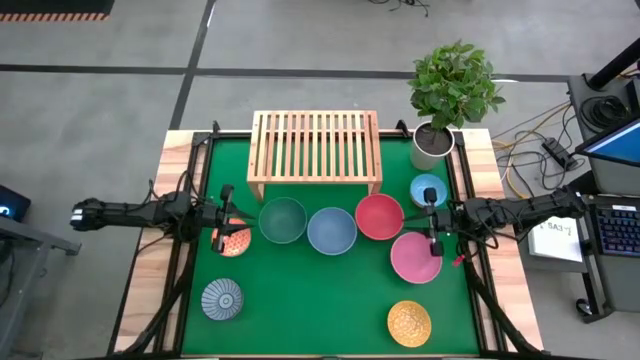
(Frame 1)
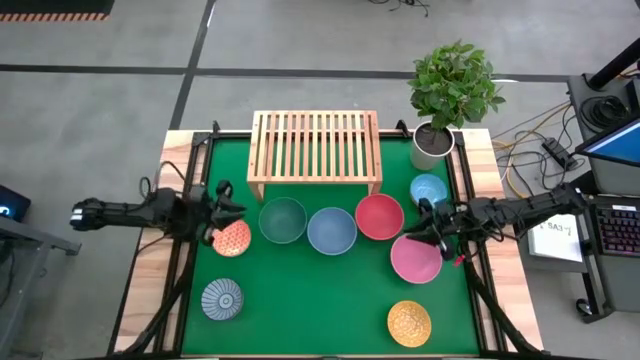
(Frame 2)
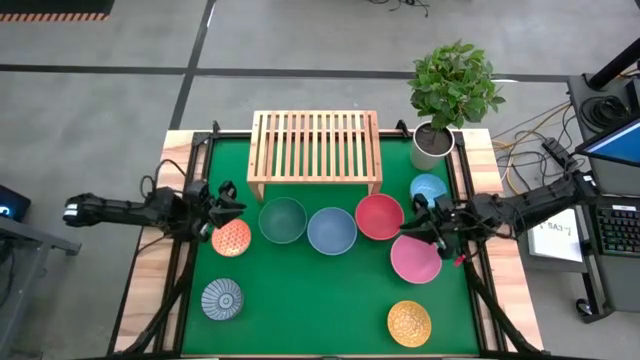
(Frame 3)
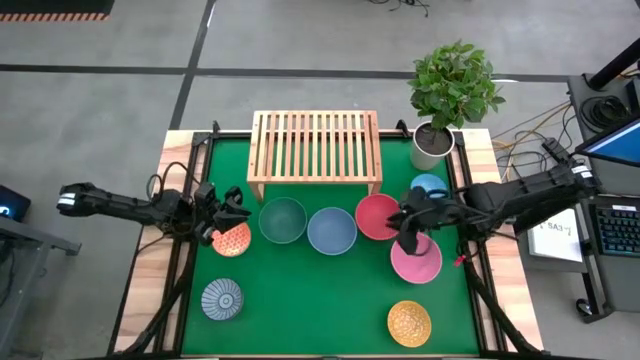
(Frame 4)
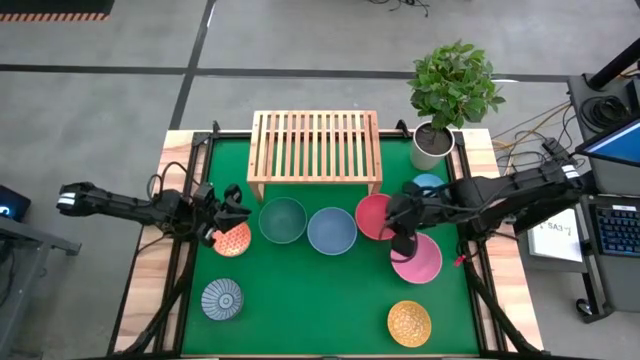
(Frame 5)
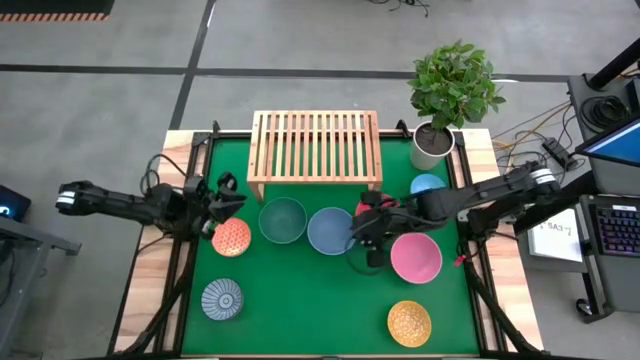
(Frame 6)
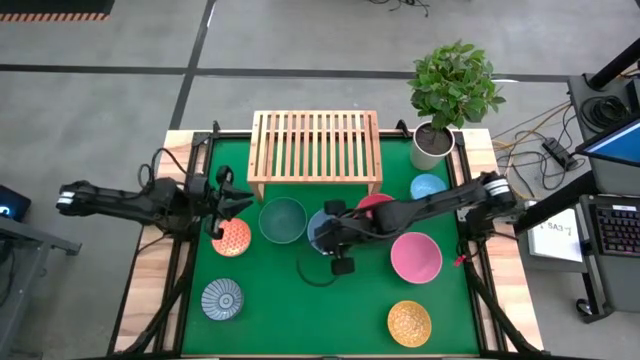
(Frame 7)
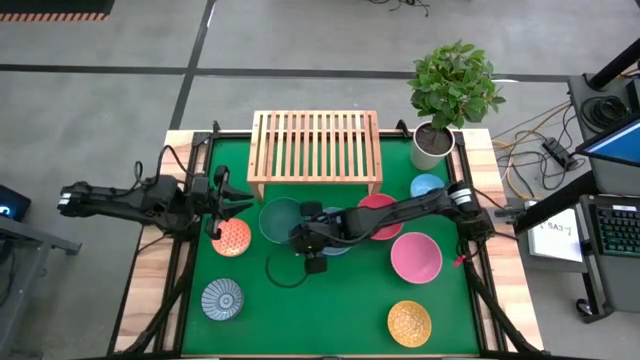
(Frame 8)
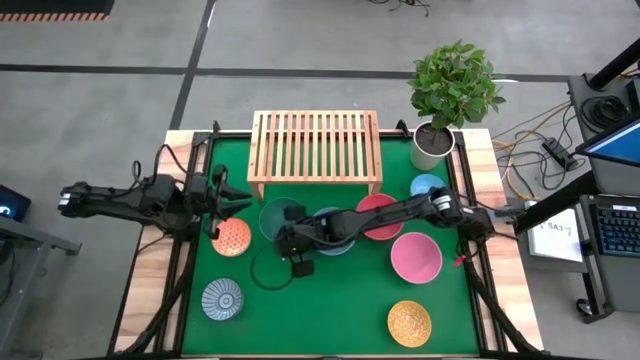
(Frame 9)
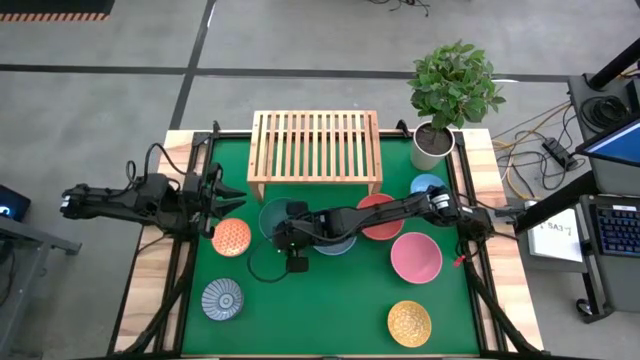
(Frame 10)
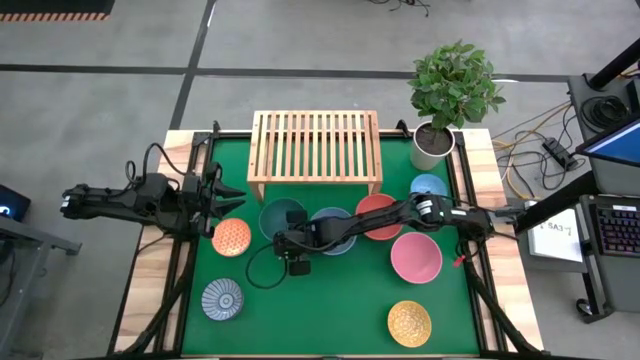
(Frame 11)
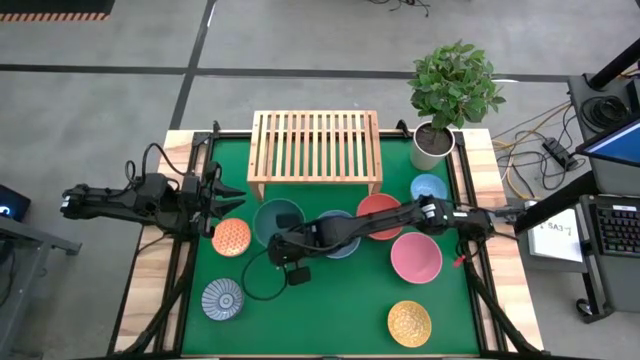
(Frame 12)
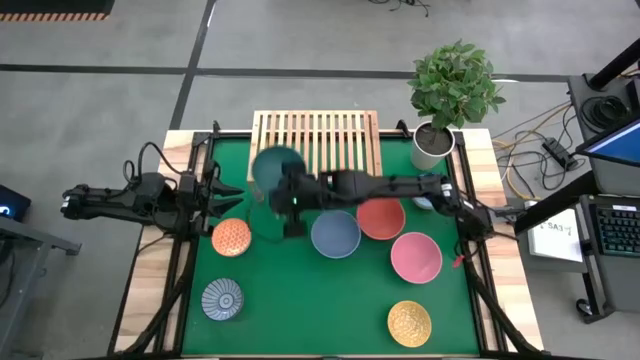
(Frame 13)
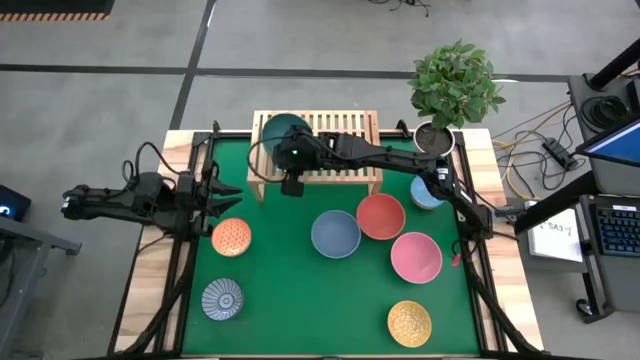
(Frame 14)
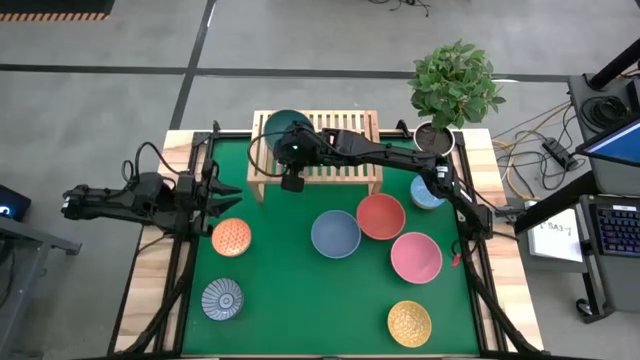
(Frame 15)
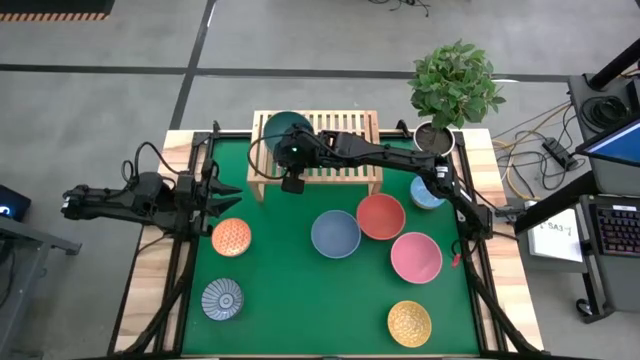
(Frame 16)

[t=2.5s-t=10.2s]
Task: Place and stack bowls onto a shelf
Put the large green bowl on the shelf

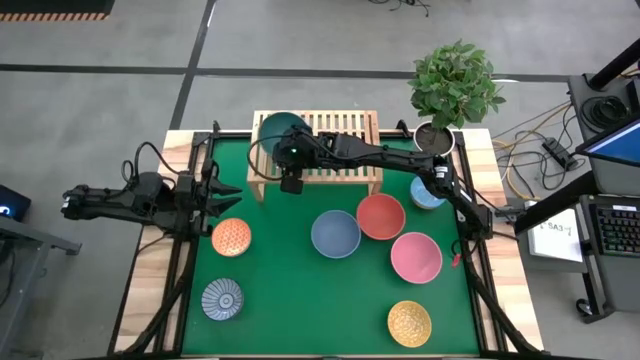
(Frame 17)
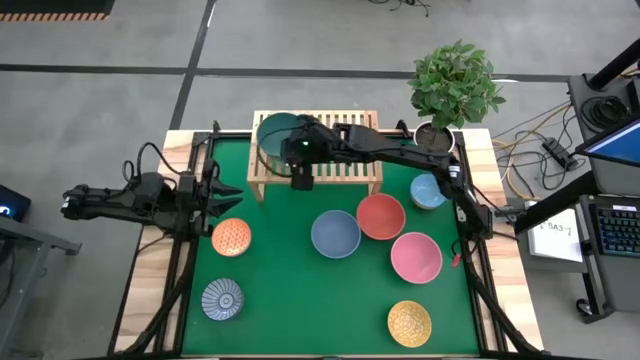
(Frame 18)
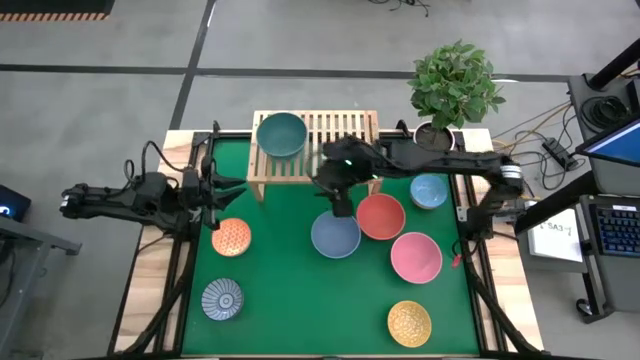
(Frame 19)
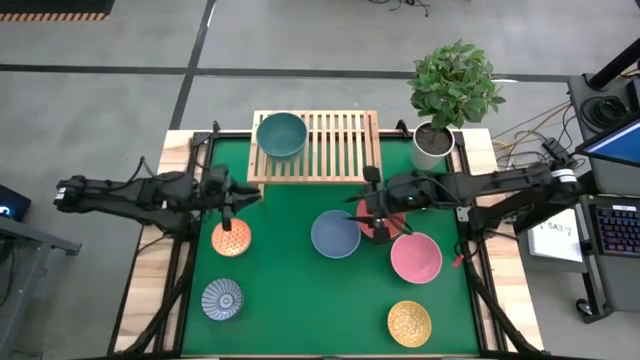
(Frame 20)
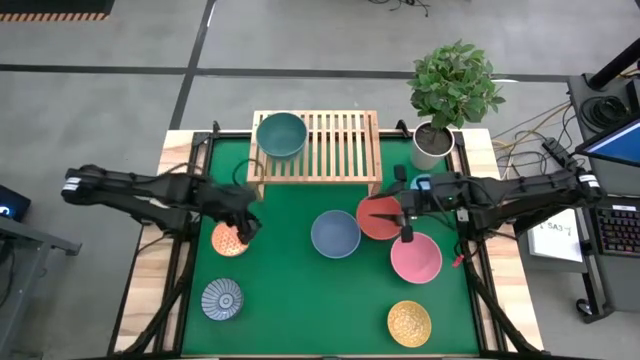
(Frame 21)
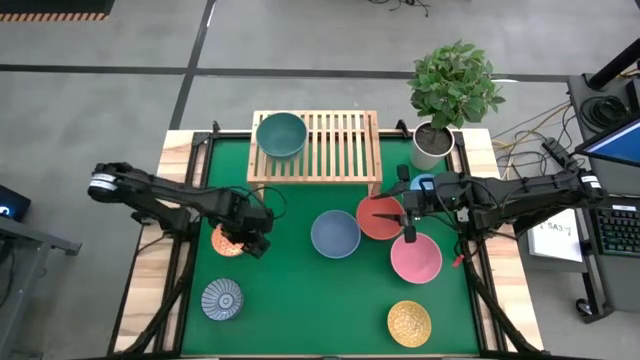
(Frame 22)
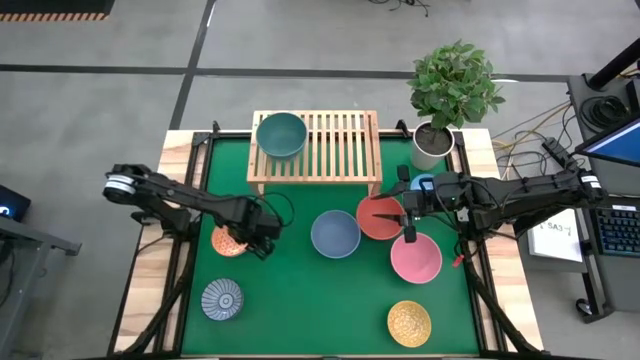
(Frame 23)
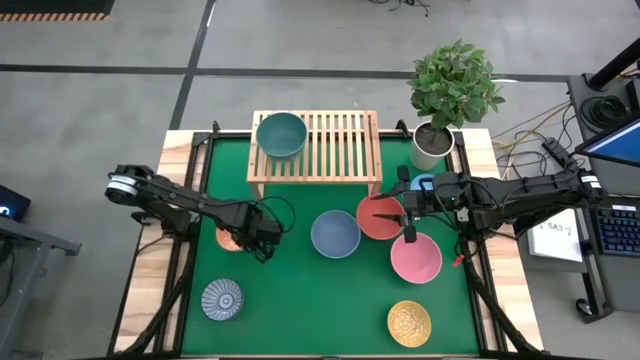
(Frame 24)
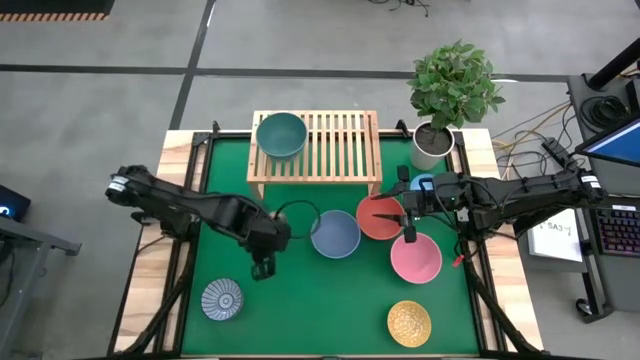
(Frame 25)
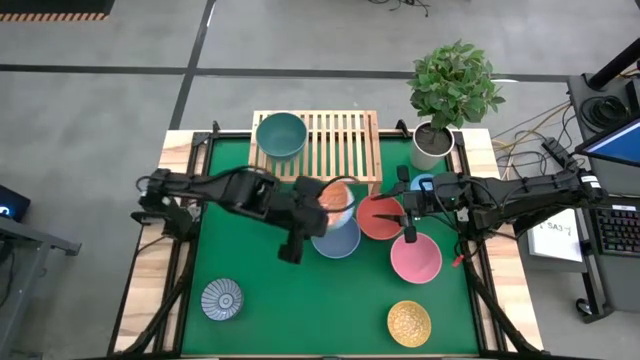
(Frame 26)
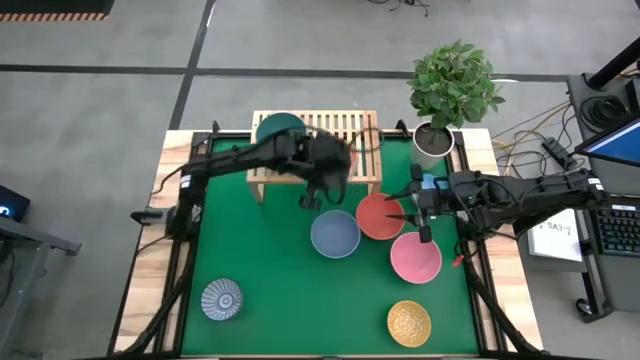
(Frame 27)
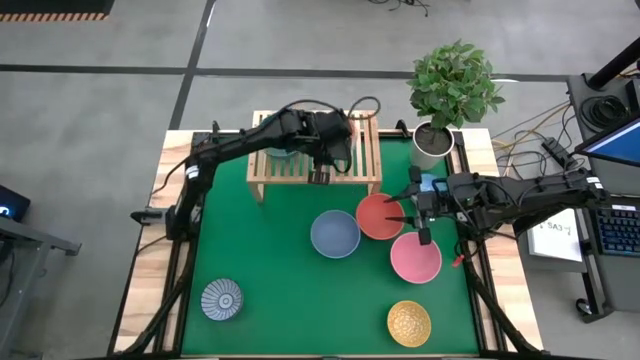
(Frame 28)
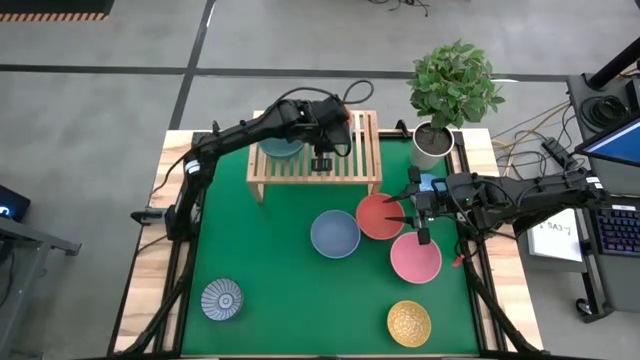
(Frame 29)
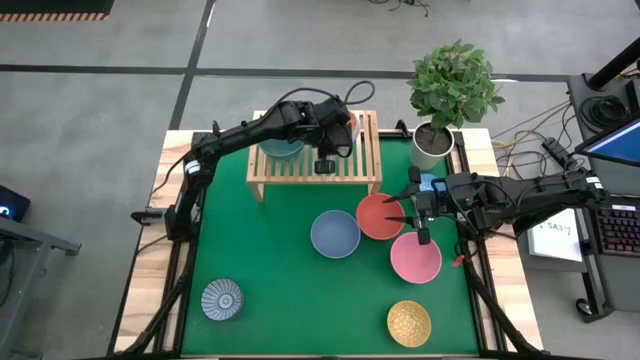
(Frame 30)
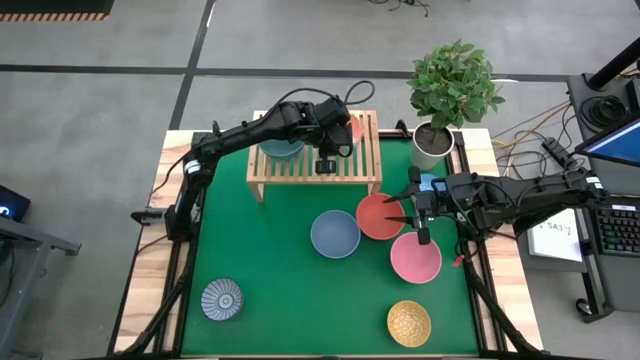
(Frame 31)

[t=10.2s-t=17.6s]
Put the small orange bowl on the shelf

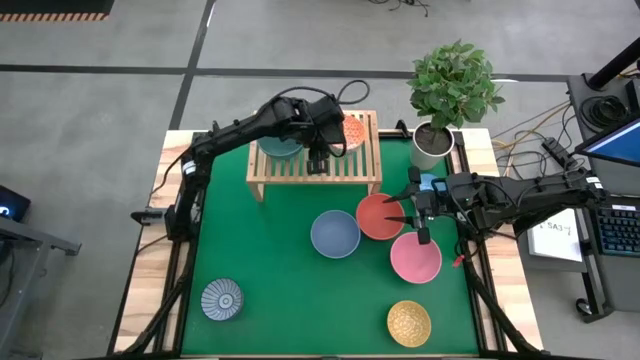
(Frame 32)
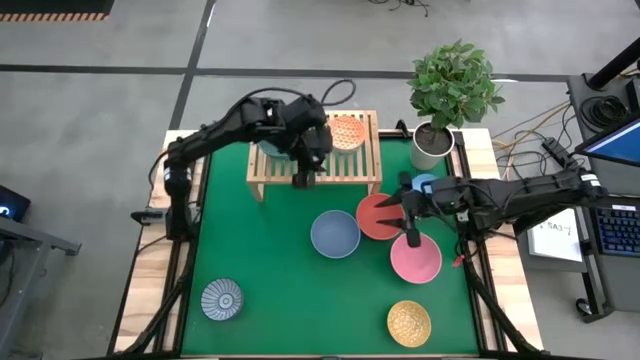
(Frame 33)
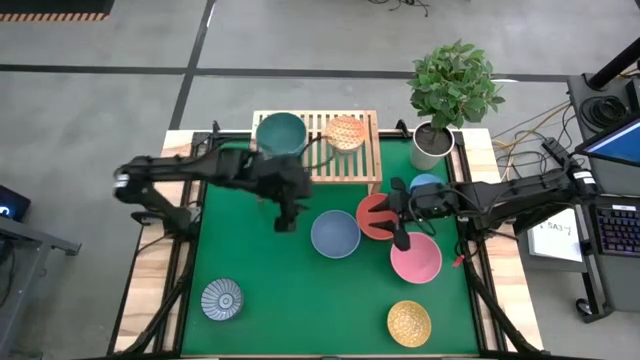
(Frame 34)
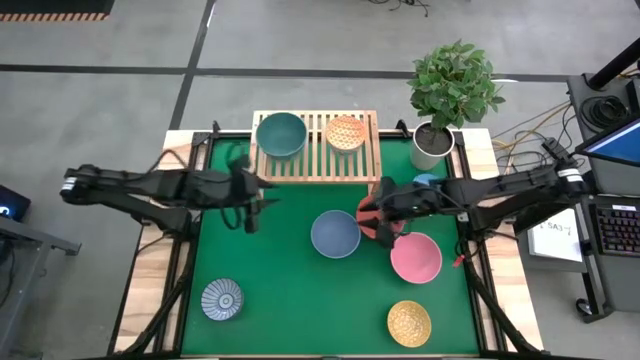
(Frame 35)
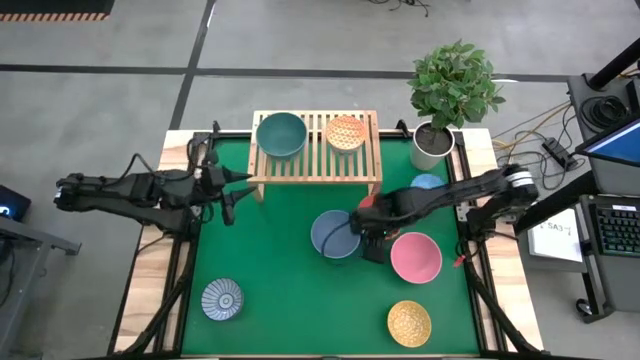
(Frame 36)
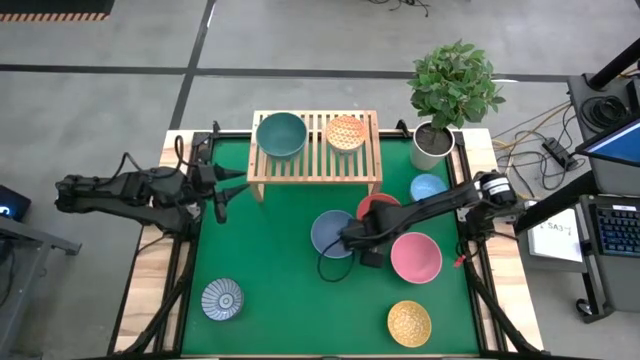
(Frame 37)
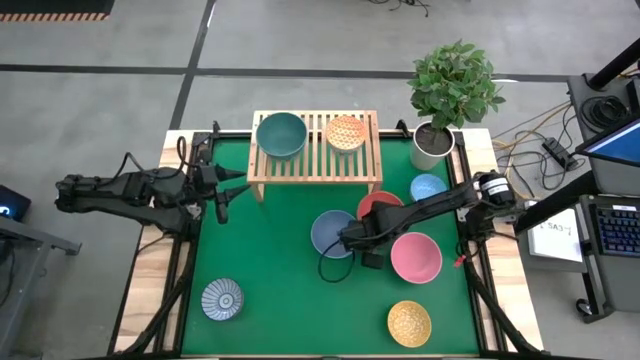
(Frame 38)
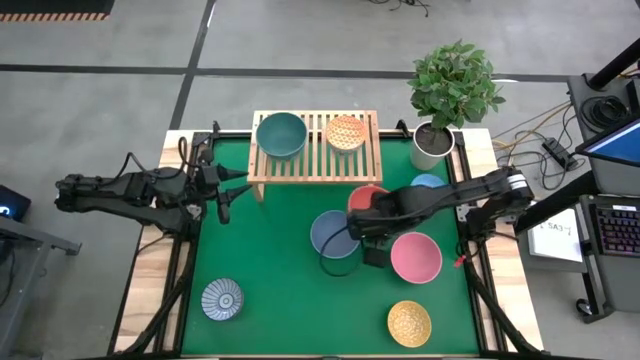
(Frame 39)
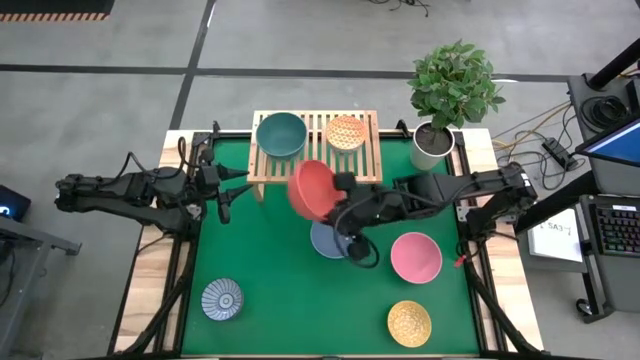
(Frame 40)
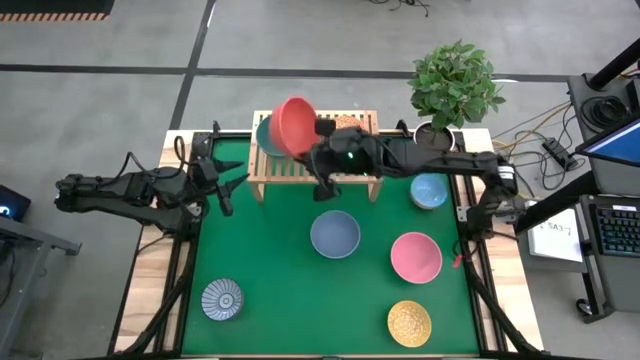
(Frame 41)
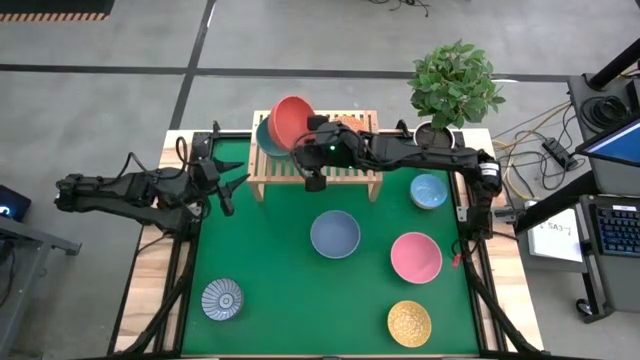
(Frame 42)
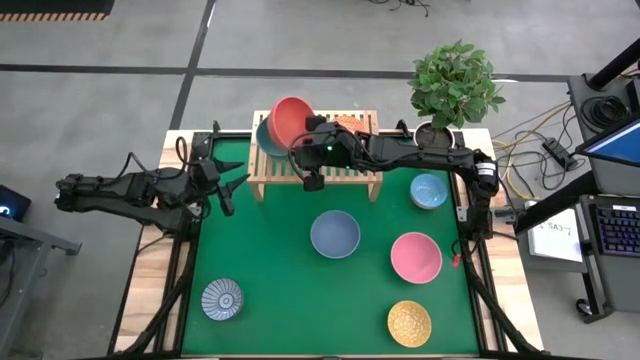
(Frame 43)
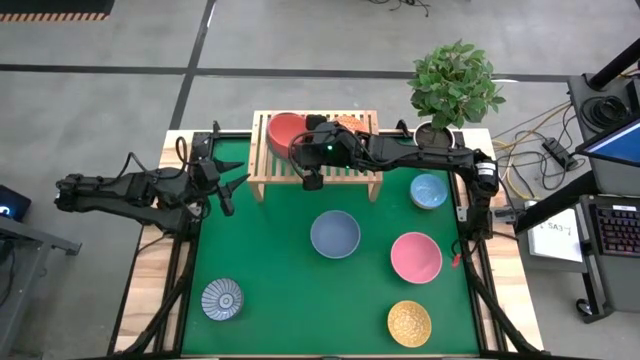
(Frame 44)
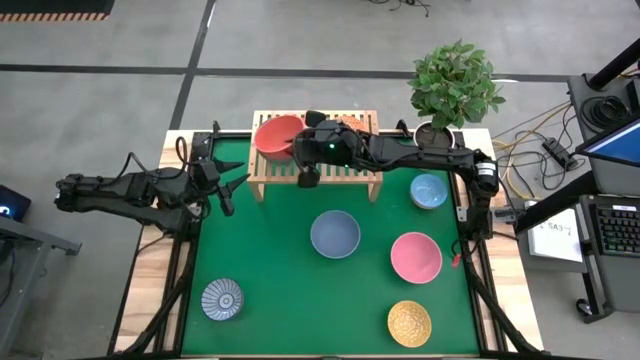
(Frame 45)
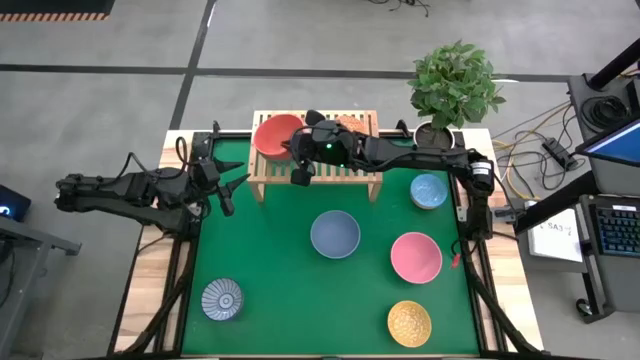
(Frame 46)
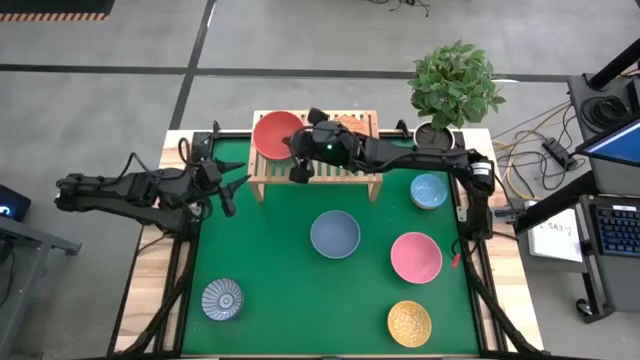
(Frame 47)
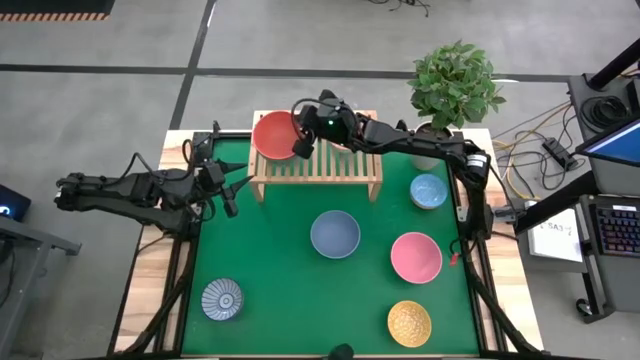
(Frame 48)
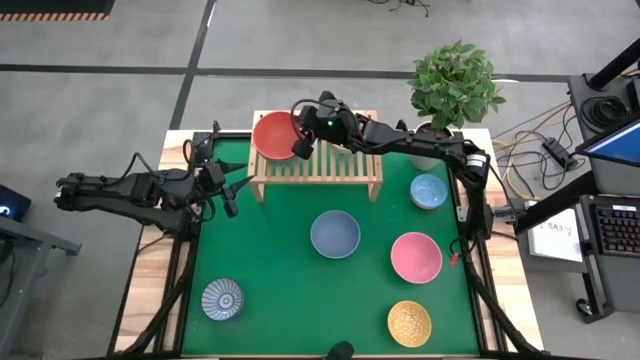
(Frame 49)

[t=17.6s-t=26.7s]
Stack the large orange bowl on the green bowl on the shelf
